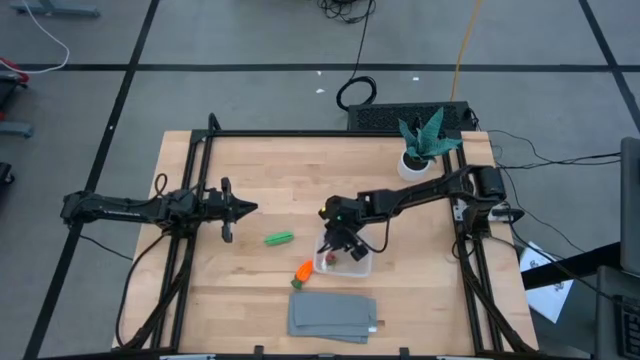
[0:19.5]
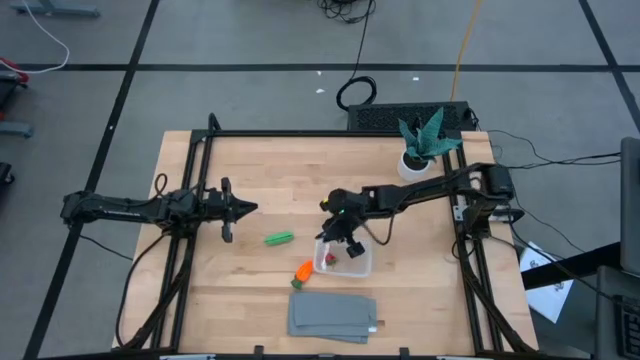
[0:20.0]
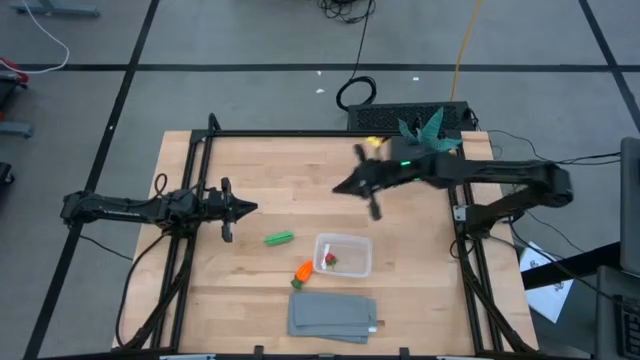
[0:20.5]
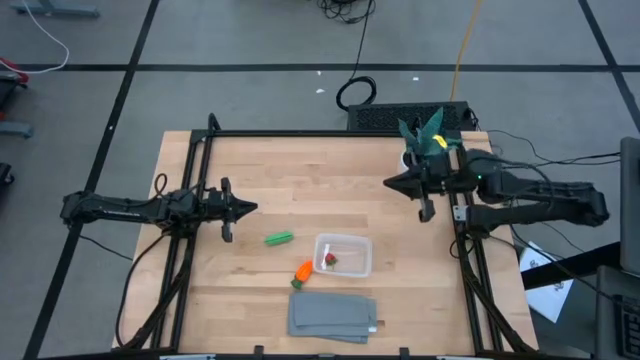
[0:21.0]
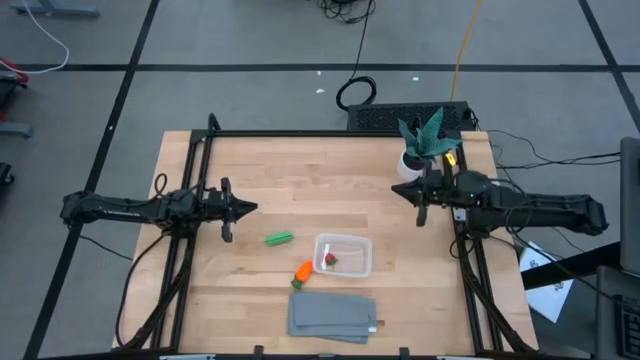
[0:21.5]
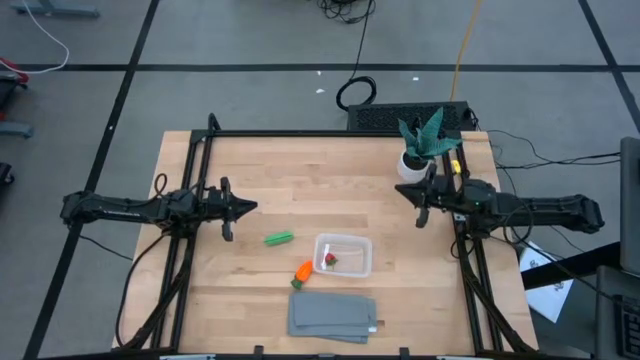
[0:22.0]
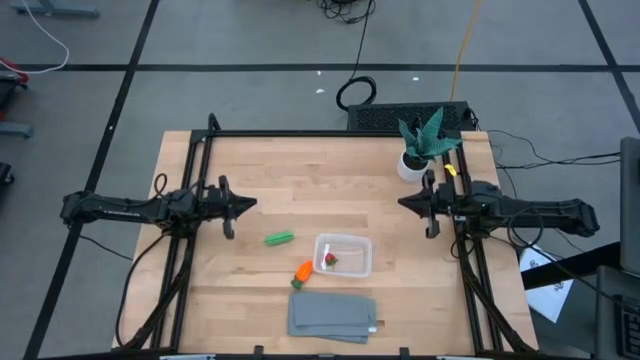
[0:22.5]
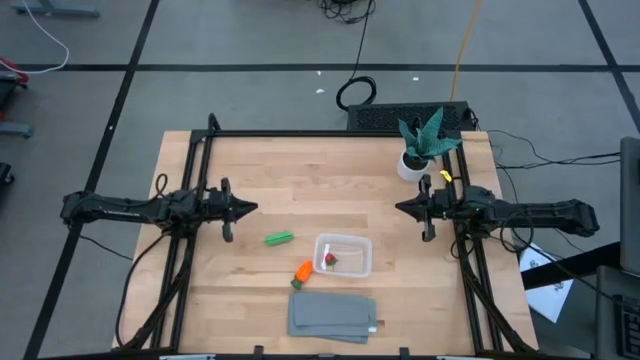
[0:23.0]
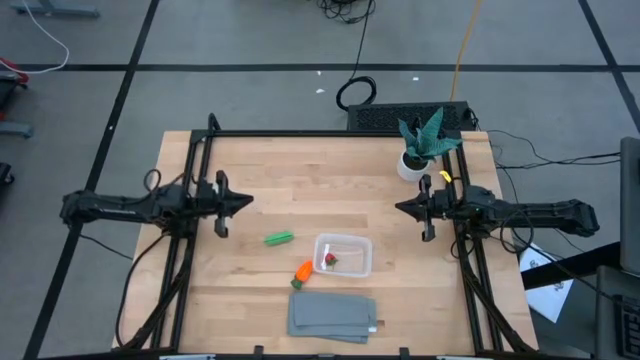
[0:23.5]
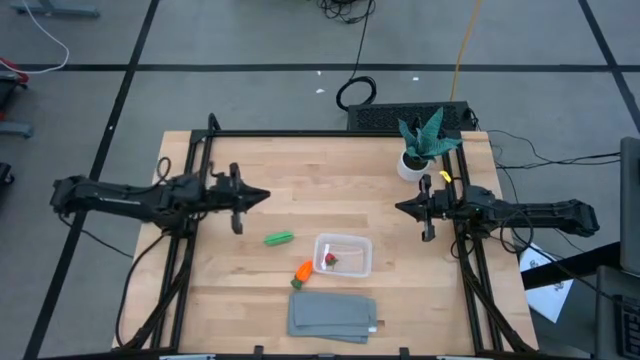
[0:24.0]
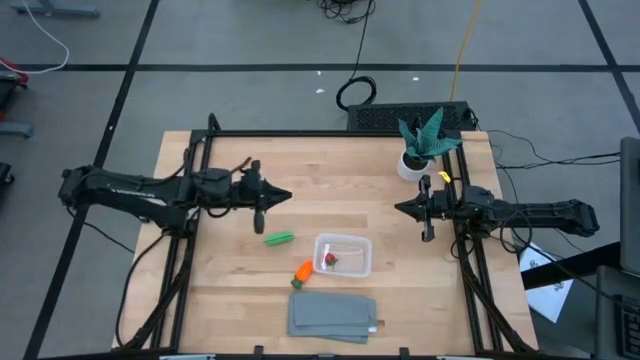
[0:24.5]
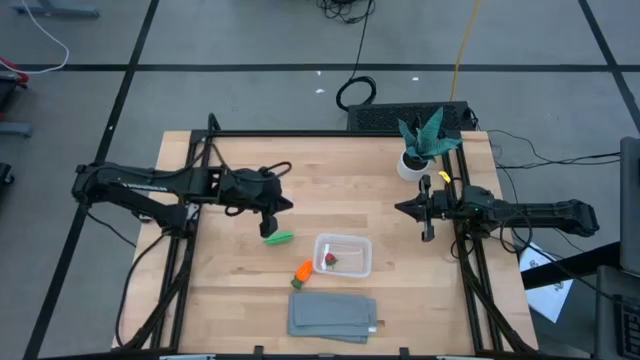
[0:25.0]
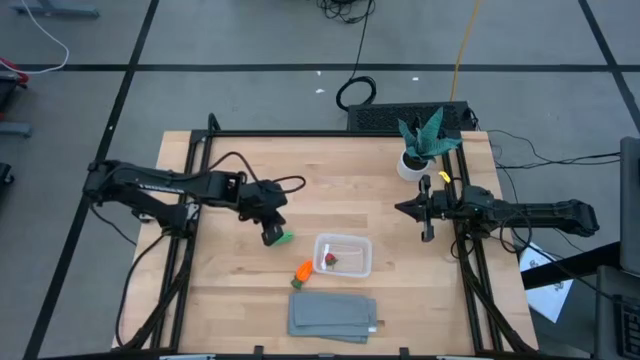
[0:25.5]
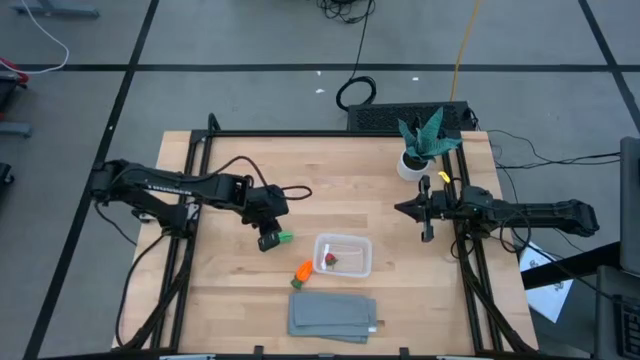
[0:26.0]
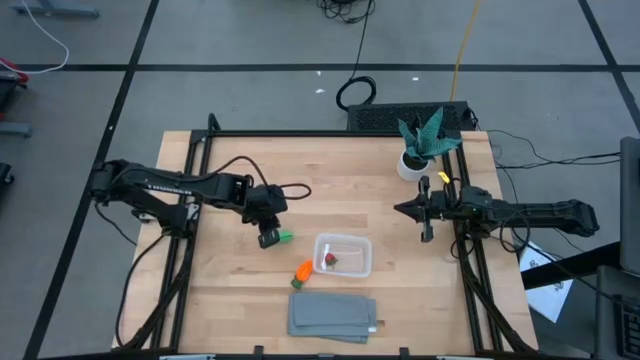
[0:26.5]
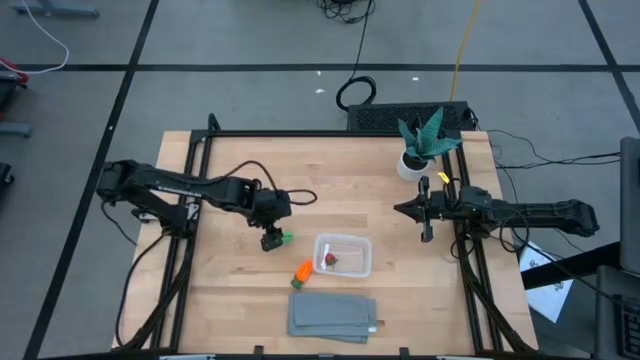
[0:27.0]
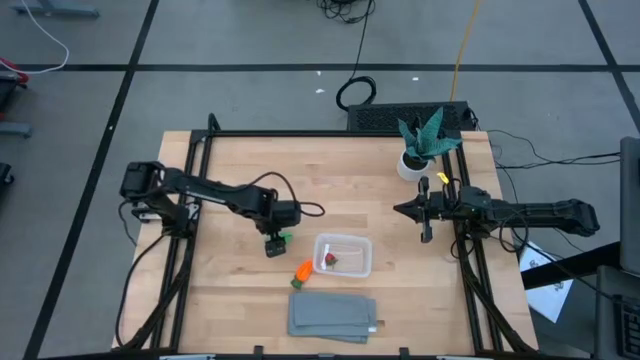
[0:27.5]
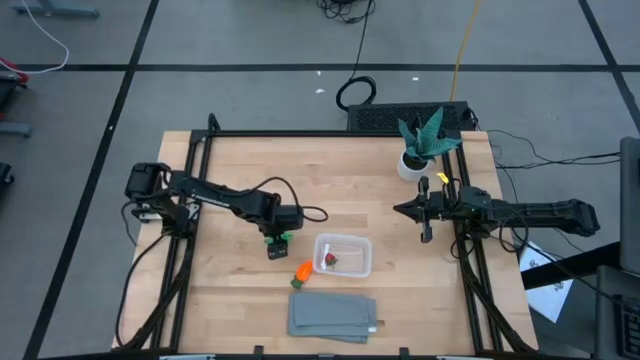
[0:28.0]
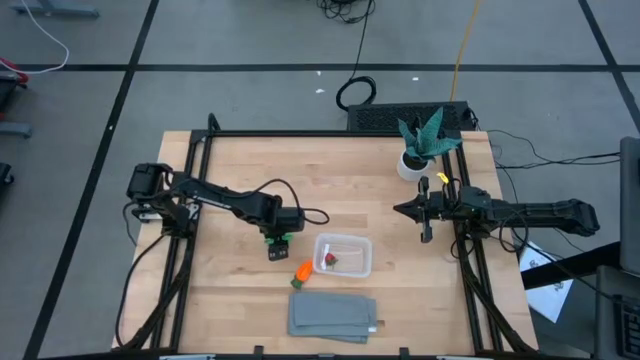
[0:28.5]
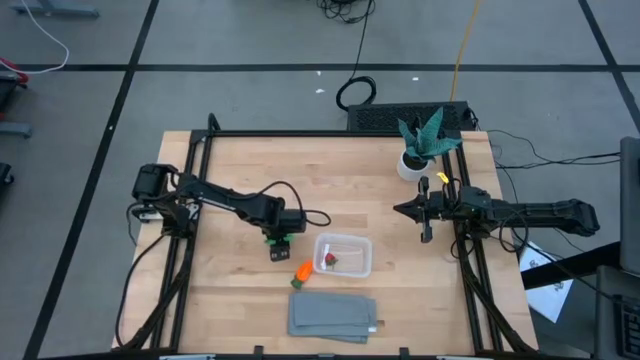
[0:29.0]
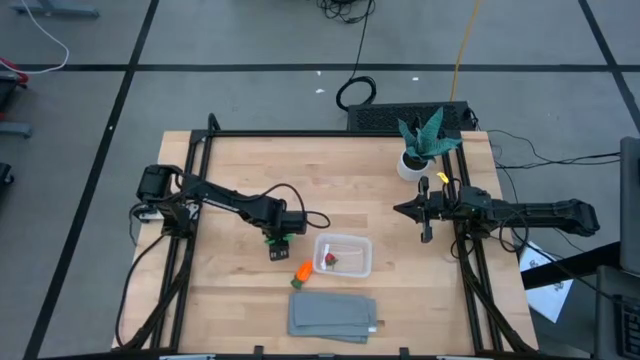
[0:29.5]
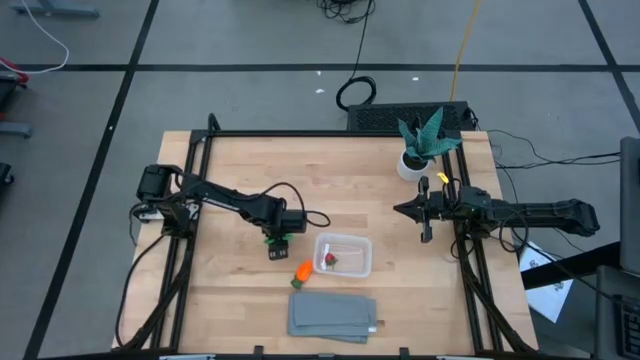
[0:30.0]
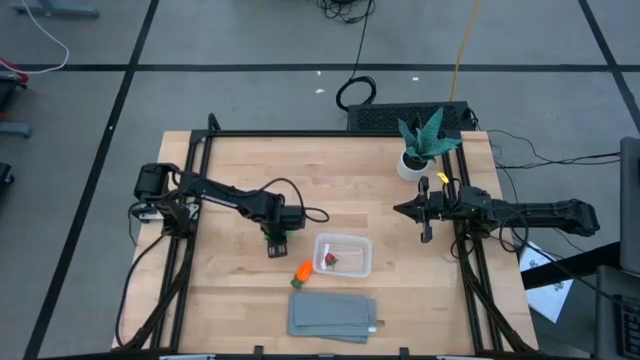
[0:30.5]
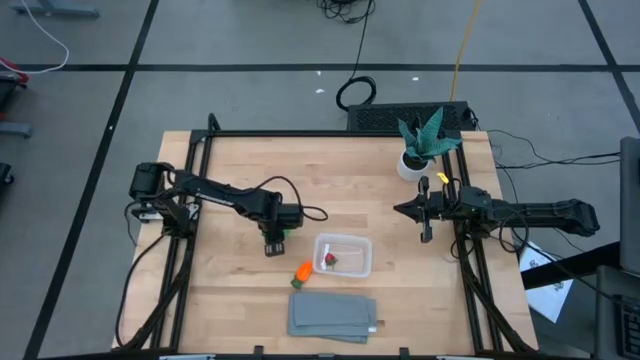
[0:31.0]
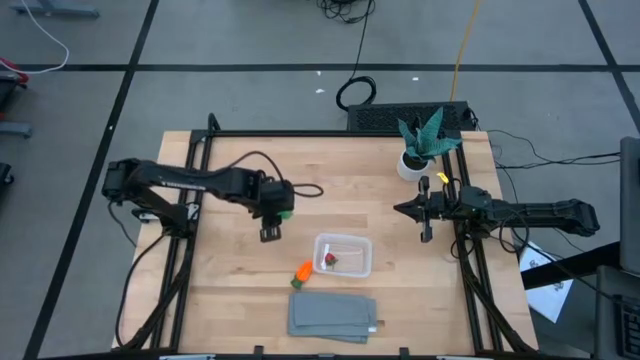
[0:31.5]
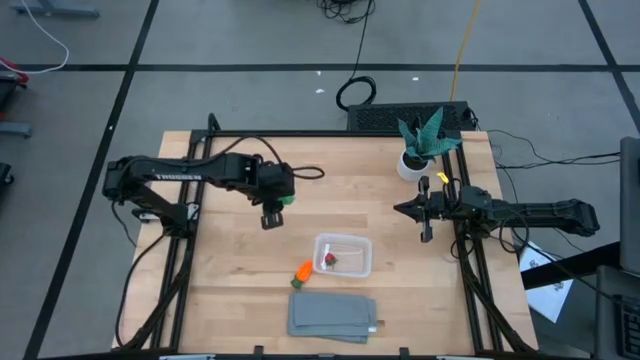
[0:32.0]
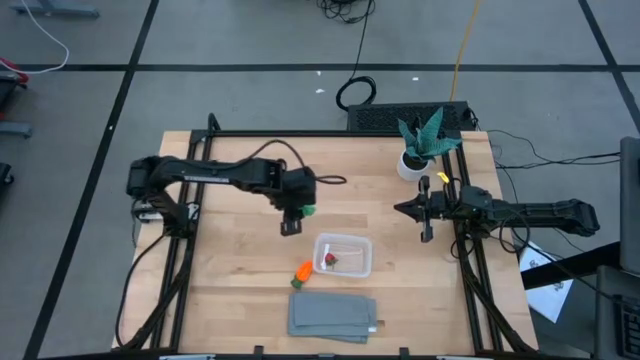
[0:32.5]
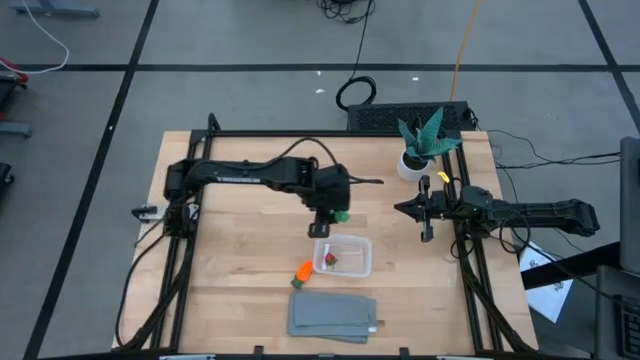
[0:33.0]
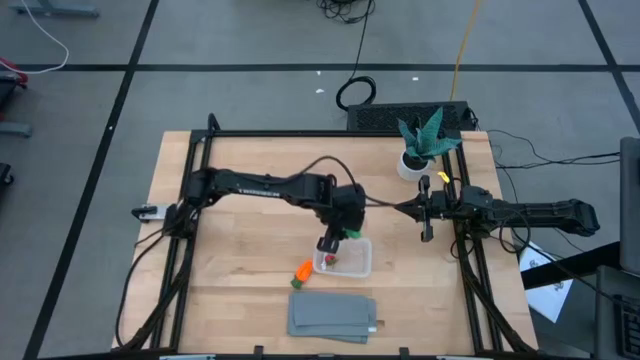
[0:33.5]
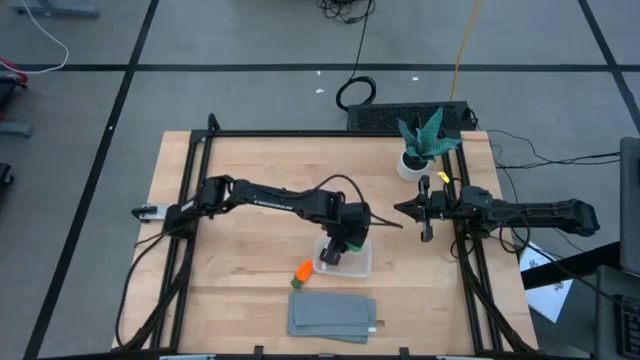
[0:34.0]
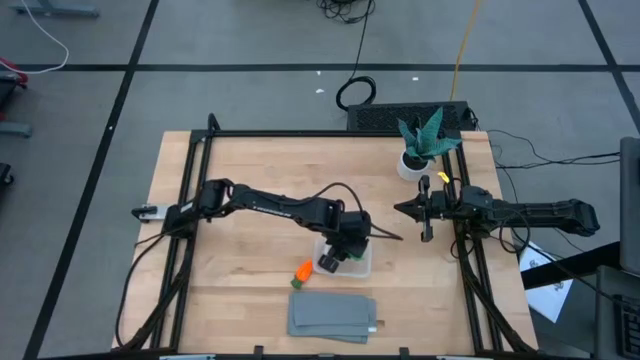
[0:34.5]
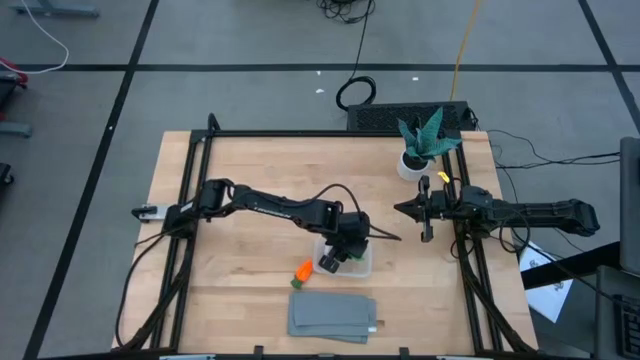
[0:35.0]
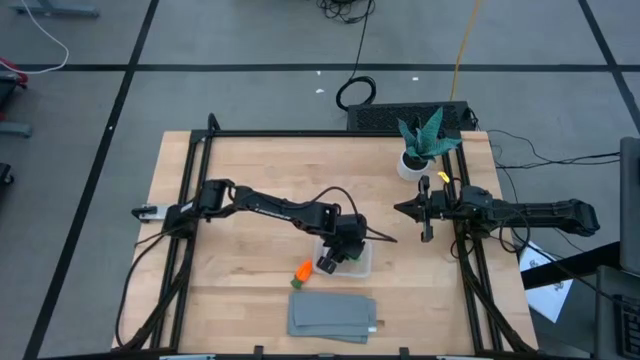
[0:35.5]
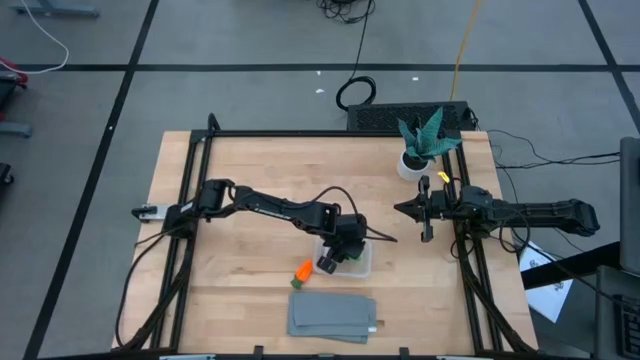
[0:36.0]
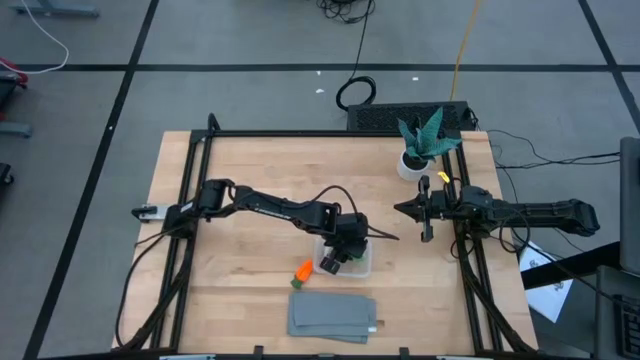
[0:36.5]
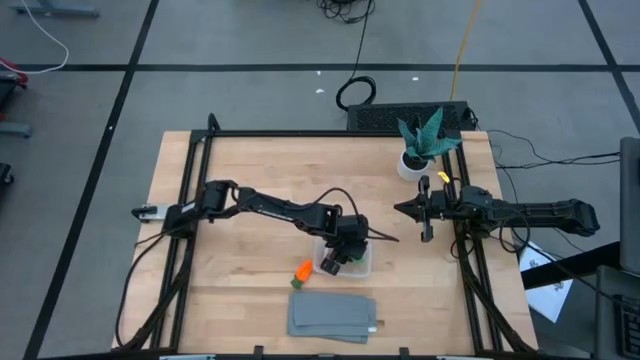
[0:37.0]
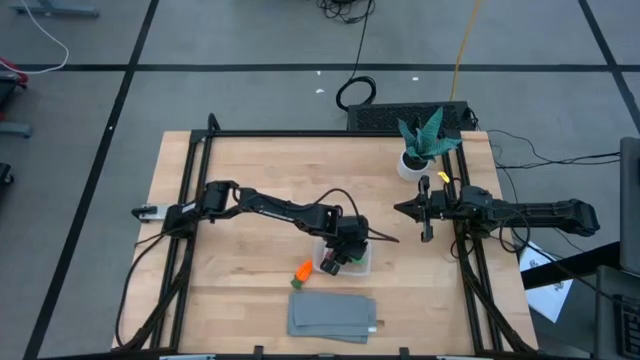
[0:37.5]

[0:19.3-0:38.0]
Task: Pick and placing Produce into tupperware
Put the green peas into the transparent bin
